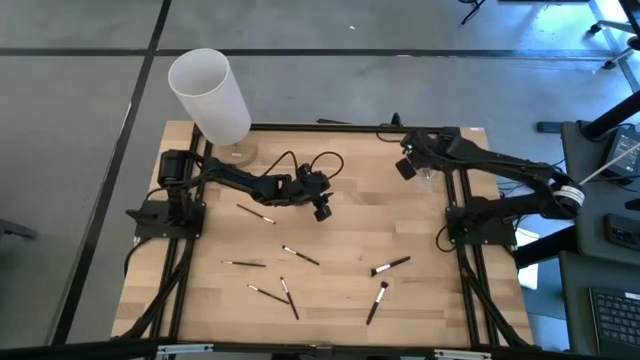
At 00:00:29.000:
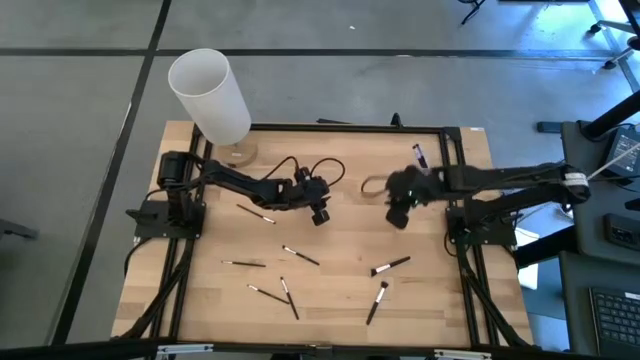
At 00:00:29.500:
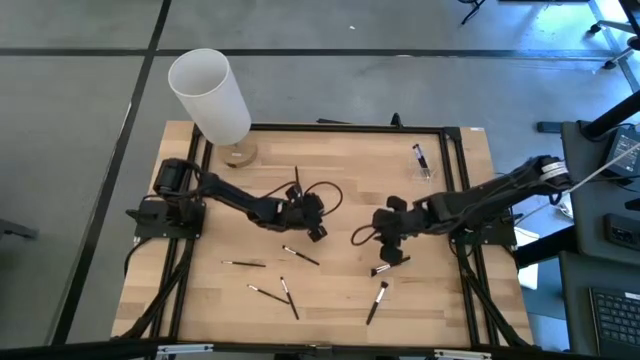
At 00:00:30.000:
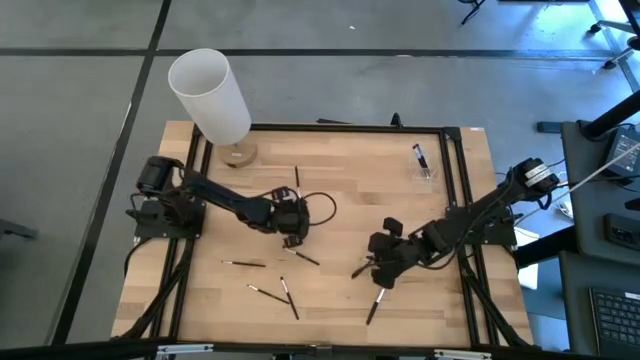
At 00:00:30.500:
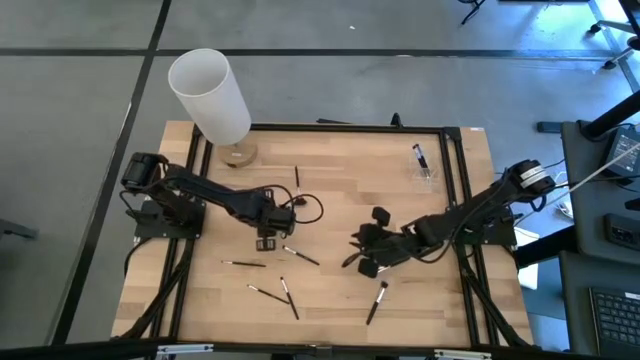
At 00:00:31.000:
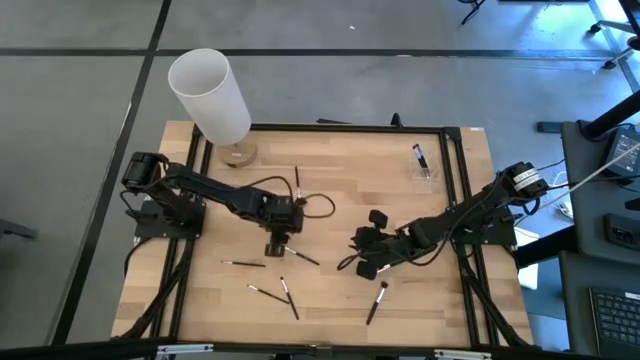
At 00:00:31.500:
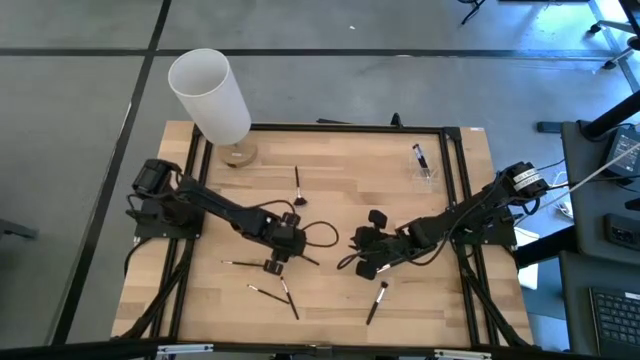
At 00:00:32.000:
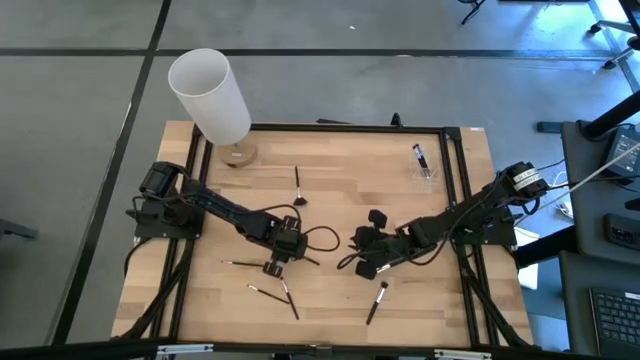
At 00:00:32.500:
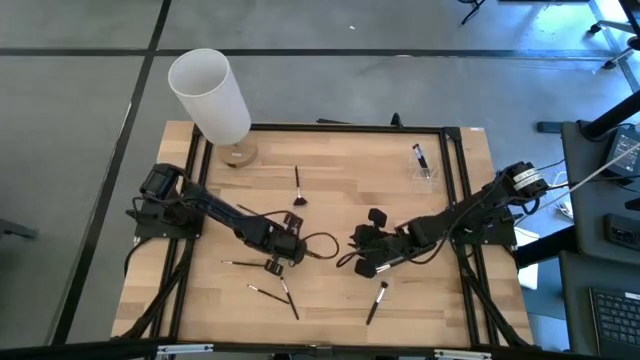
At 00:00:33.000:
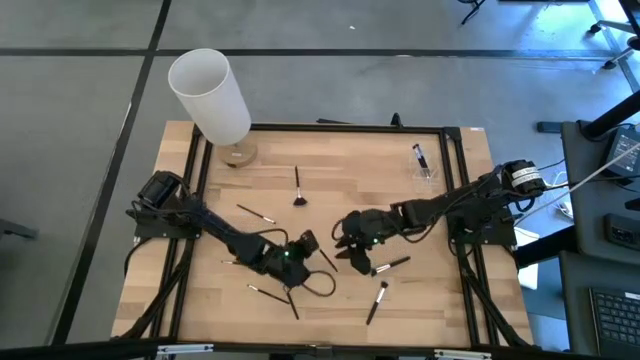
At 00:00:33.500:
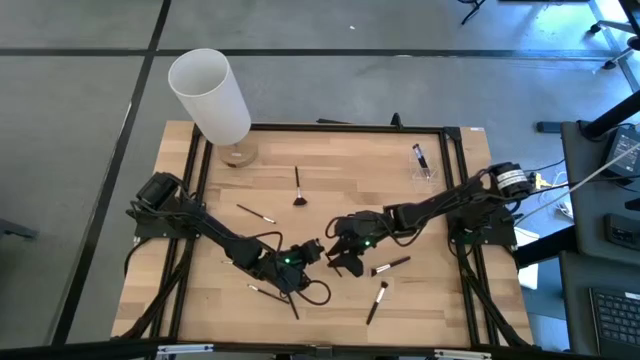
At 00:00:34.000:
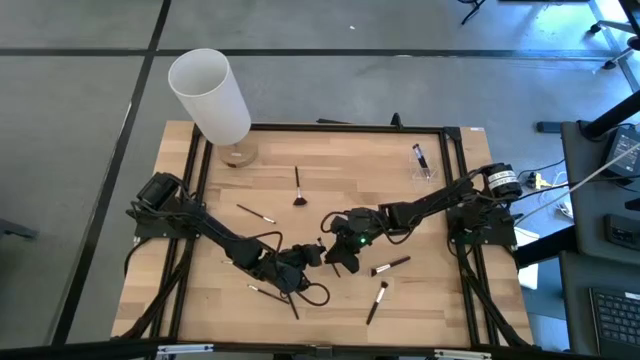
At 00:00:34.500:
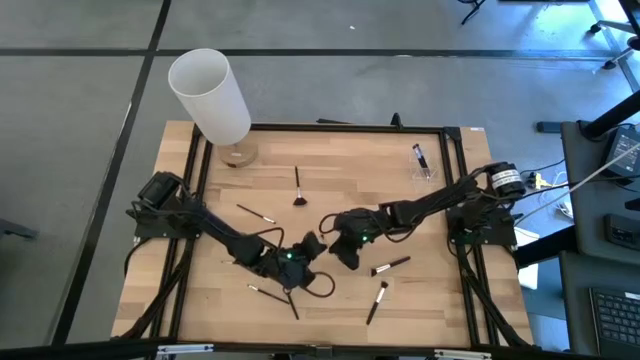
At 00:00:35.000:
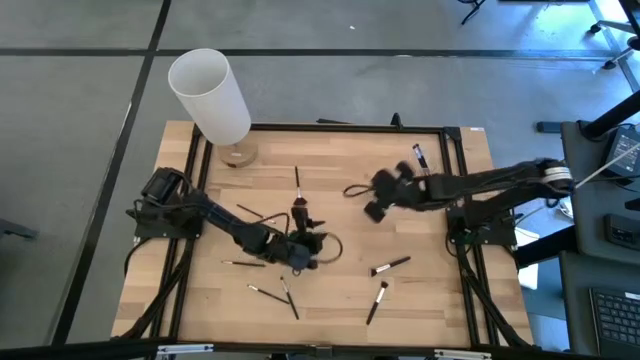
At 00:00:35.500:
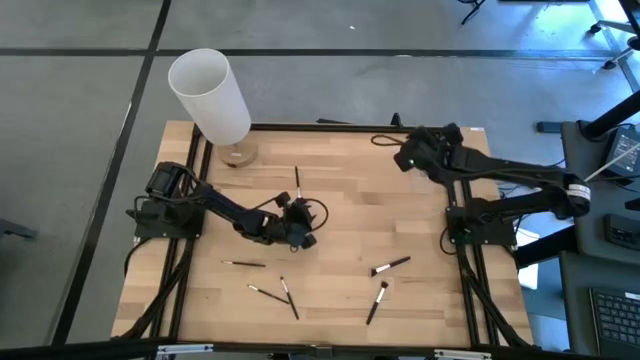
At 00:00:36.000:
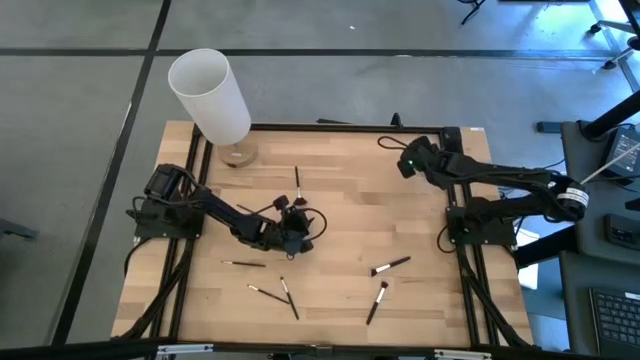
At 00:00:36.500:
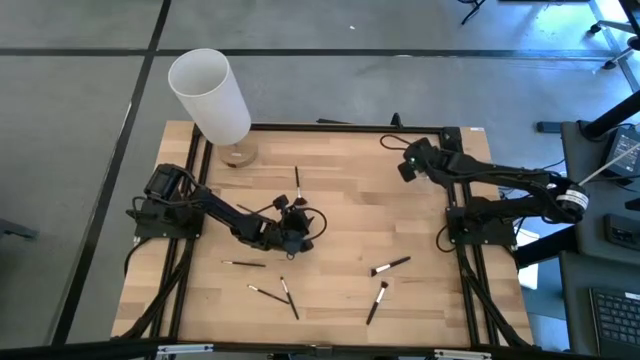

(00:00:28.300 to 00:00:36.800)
Task: Sort items
Put the foundation brush into the middle section of the transparent organizer

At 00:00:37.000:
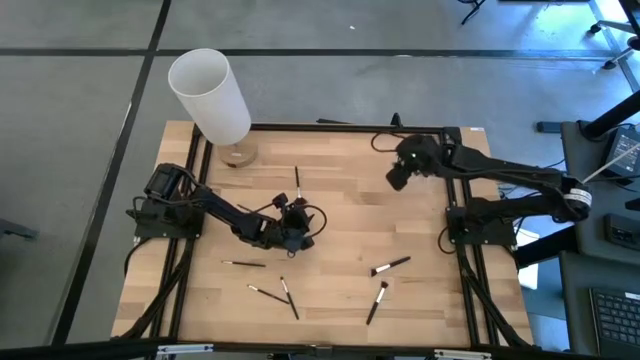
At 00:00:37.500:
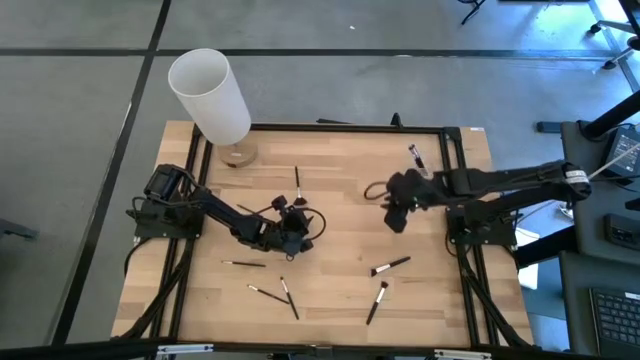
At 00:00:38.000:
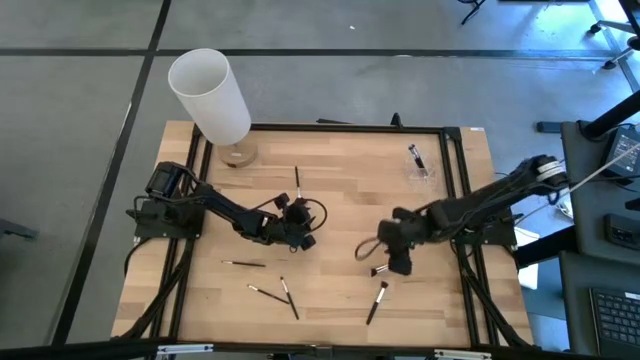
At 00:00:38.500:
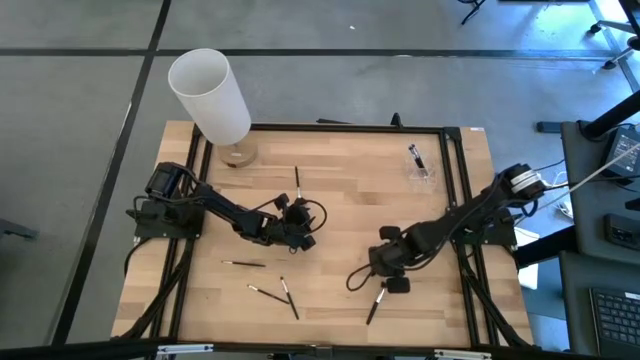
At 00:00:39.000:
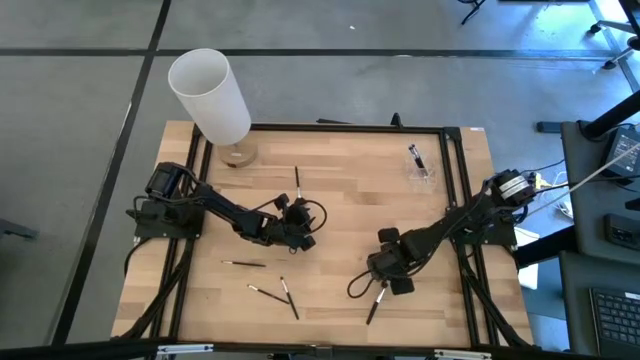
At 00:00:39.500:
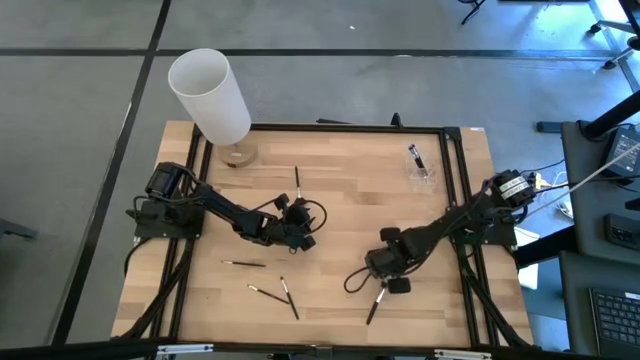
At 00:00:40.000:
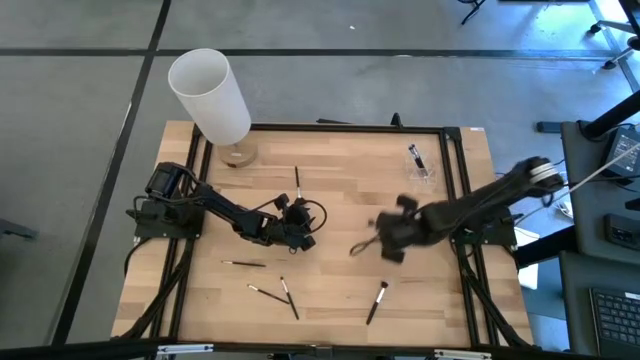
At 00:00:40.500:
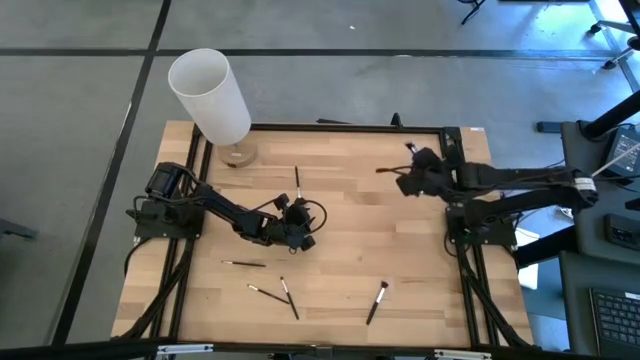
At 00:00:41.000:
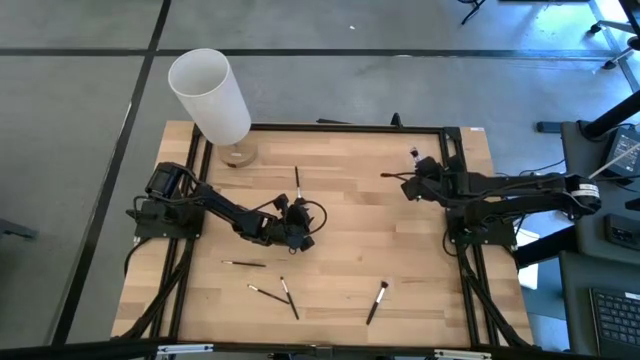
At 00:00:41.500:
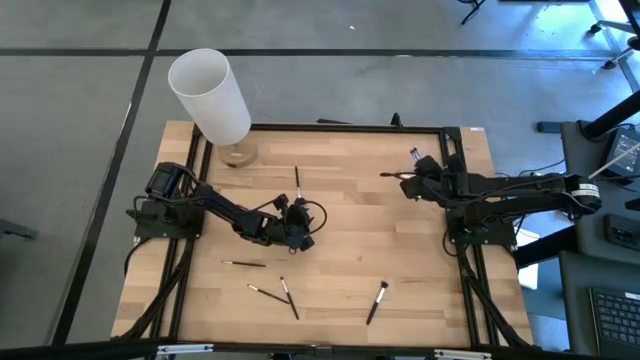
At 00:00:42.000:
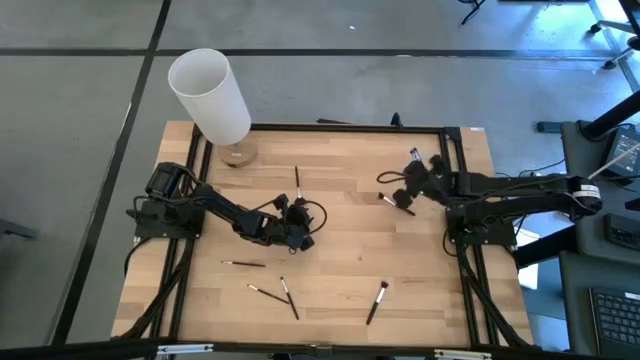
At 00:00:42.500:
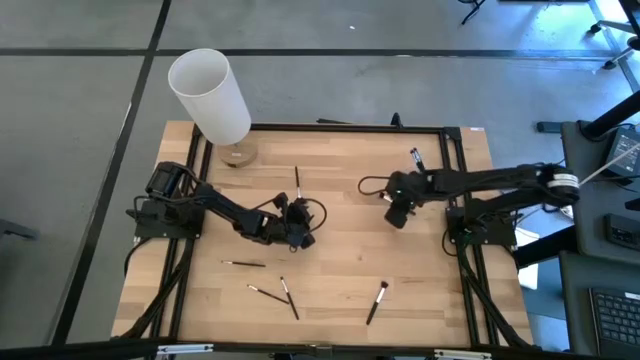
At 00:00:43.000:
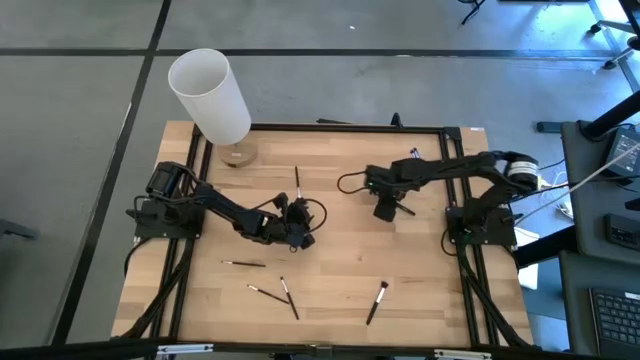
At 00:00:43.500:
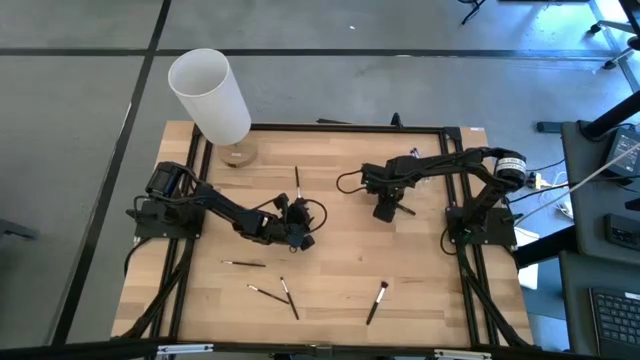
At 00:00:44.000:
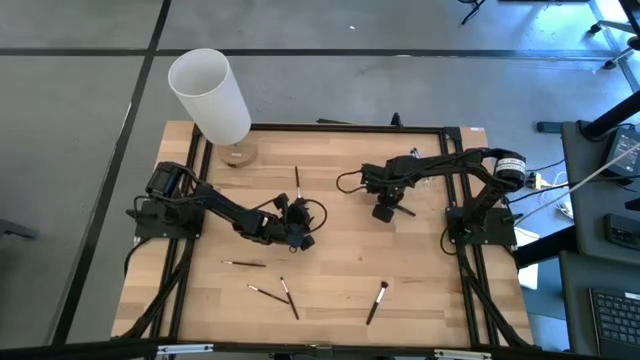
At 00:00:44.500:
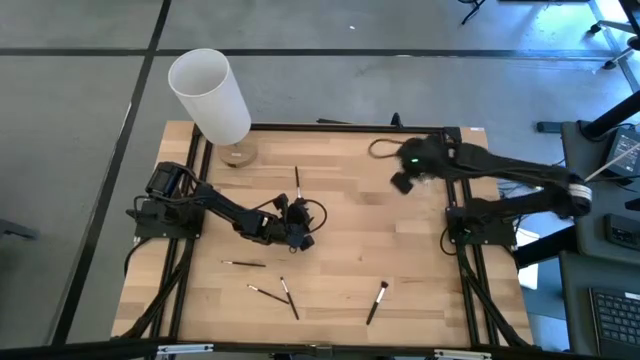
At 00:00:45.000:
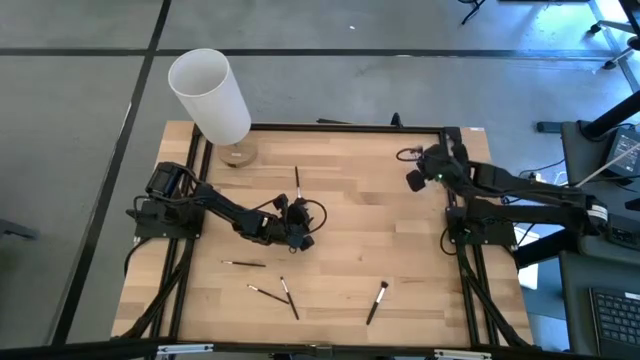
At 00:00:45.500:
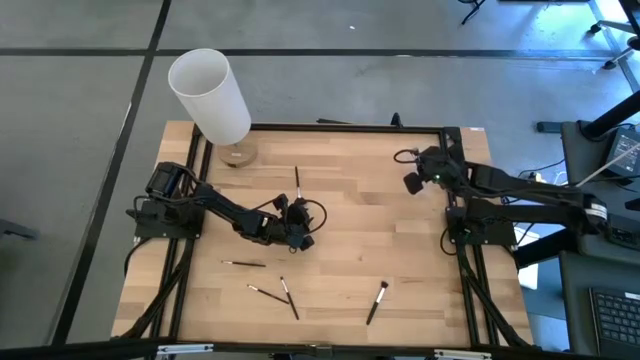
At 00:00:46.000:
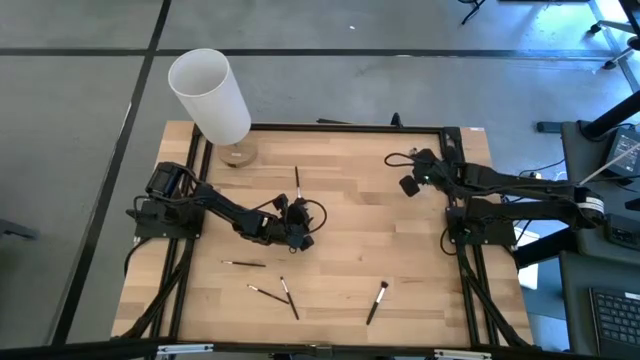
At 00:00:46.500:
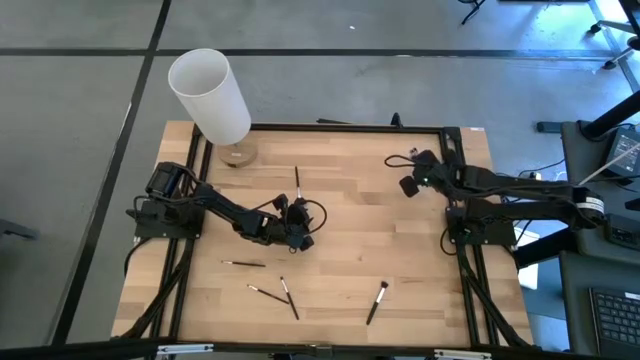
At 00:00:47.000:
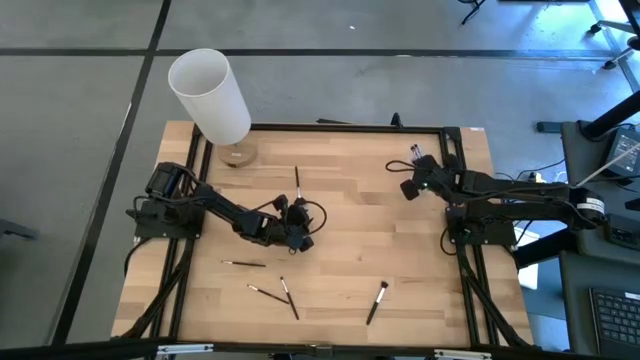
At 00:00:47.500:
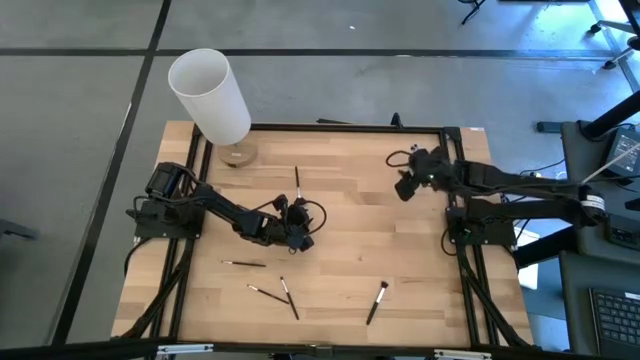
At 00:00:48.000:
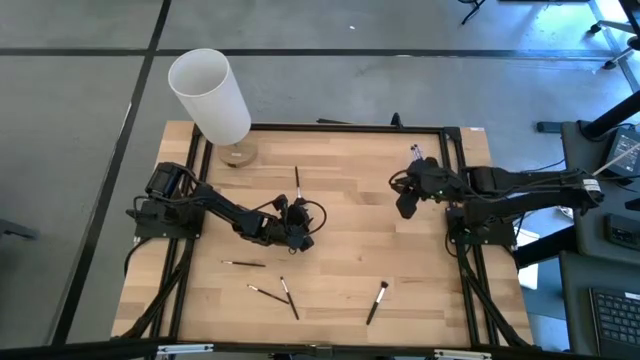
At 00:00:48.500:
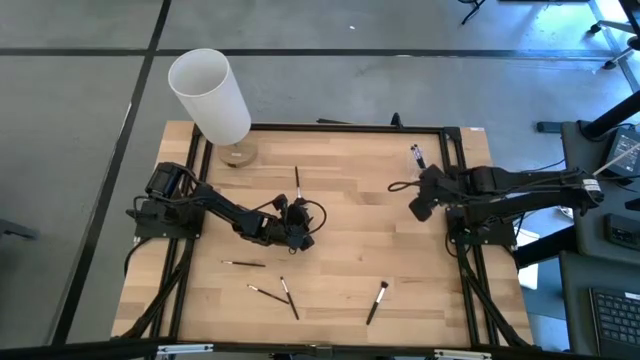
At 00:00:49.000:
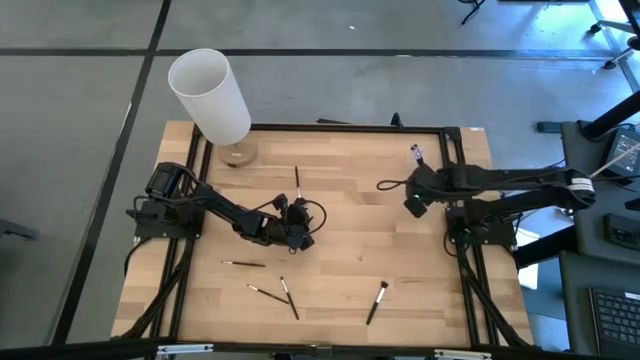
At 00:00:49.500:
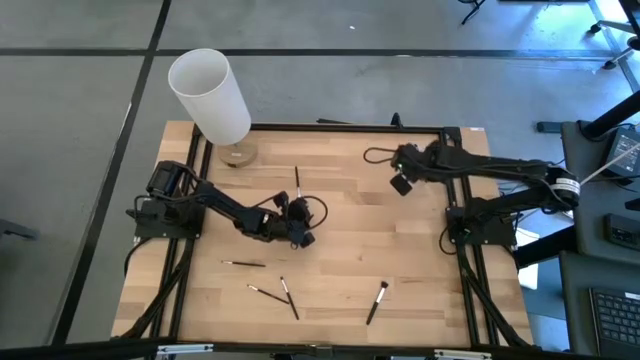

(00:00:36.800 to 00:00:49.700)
Put the powder brush into the bottom section of the transparent organizer
